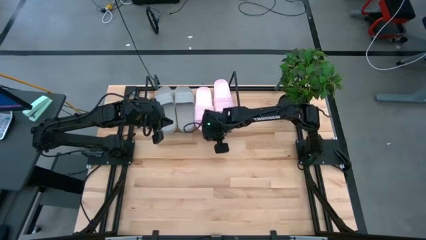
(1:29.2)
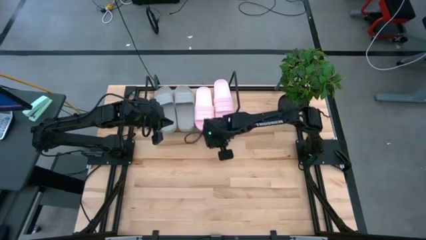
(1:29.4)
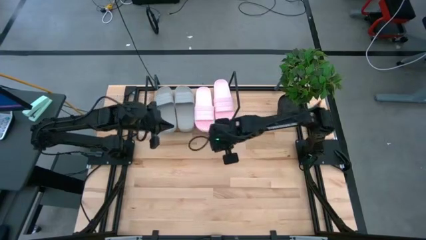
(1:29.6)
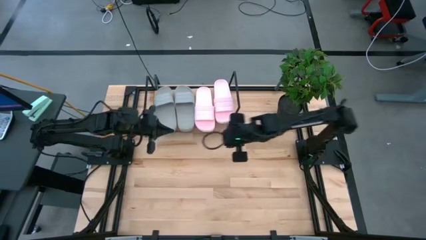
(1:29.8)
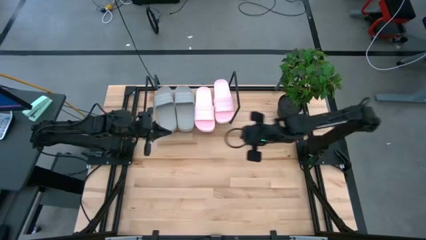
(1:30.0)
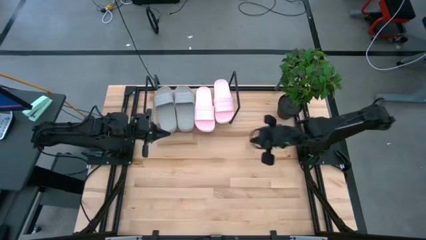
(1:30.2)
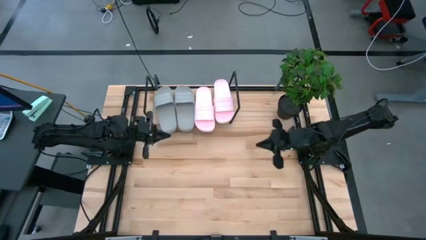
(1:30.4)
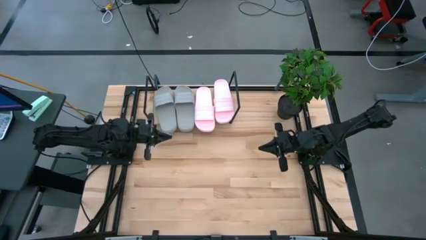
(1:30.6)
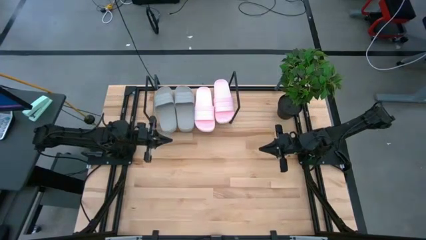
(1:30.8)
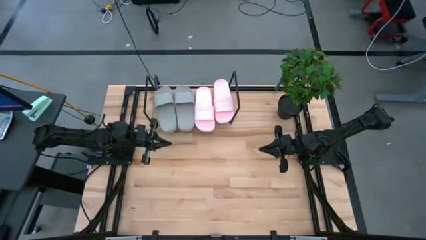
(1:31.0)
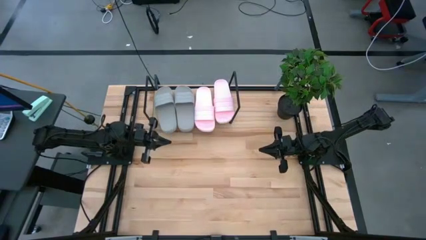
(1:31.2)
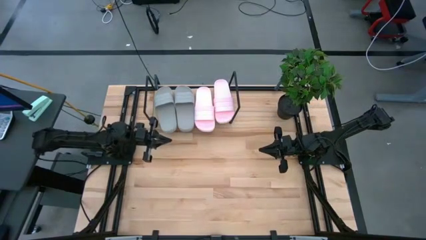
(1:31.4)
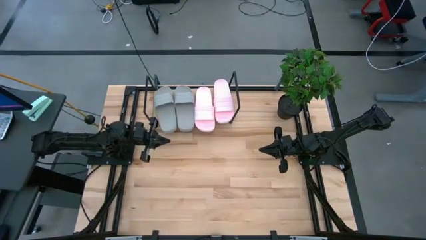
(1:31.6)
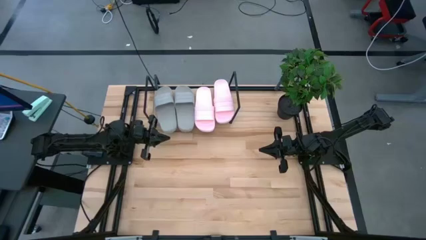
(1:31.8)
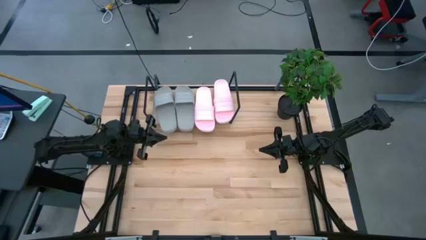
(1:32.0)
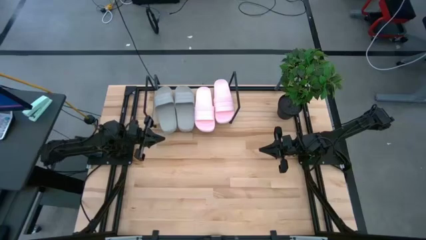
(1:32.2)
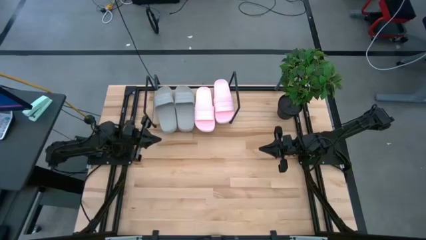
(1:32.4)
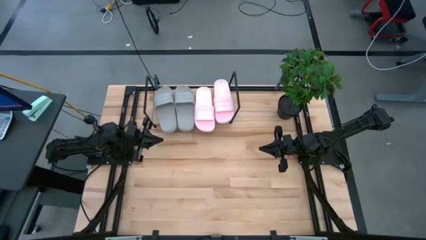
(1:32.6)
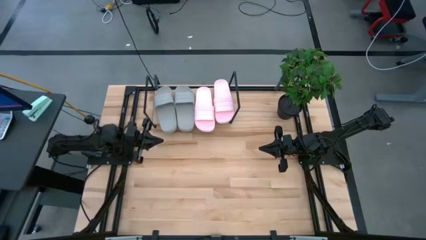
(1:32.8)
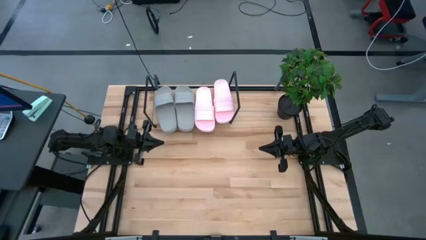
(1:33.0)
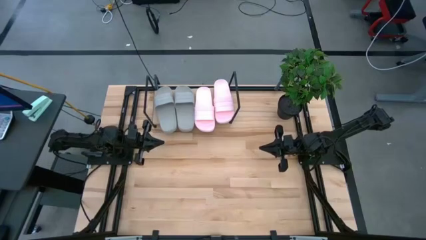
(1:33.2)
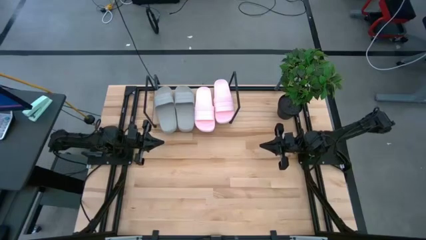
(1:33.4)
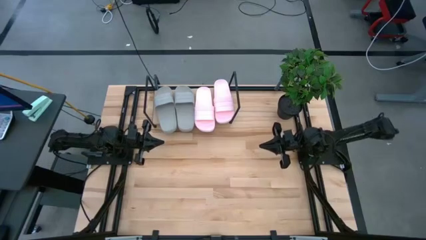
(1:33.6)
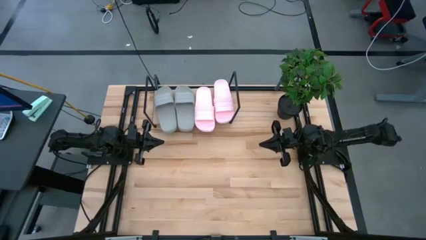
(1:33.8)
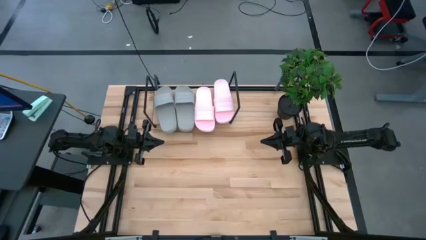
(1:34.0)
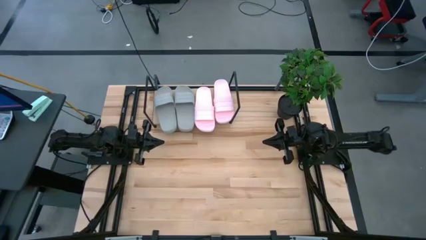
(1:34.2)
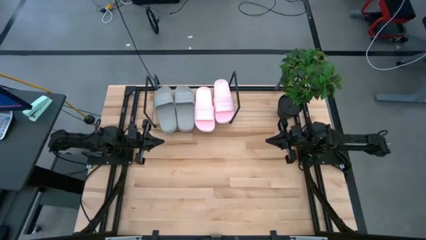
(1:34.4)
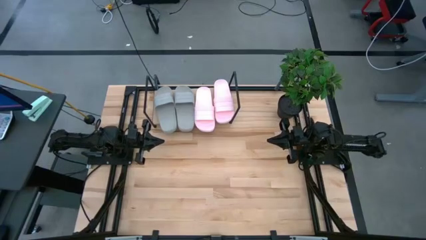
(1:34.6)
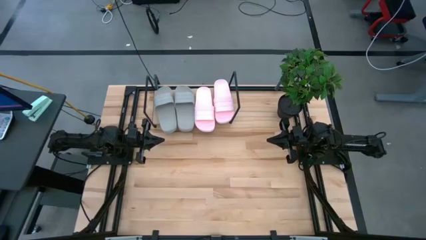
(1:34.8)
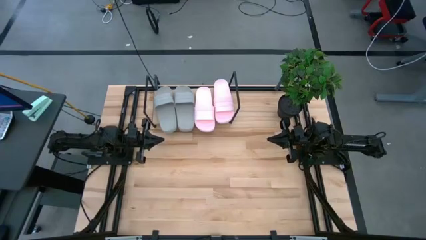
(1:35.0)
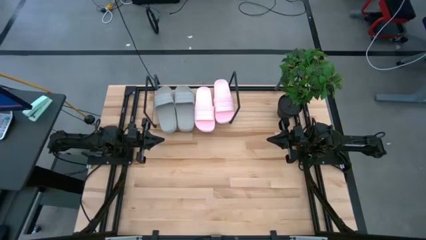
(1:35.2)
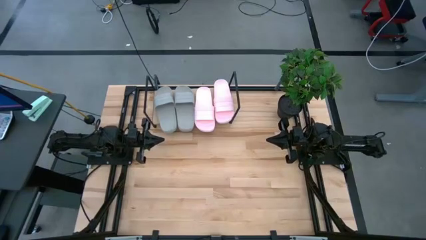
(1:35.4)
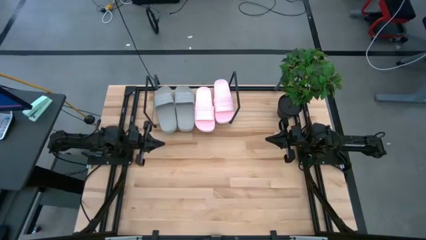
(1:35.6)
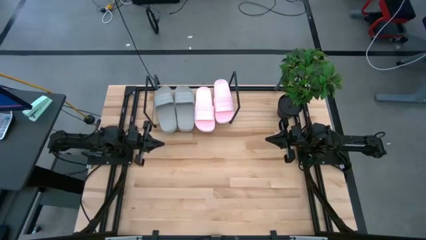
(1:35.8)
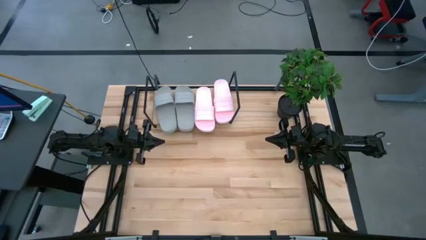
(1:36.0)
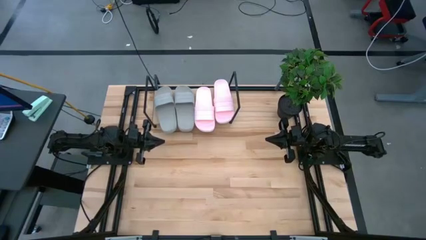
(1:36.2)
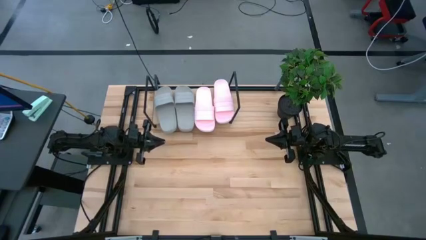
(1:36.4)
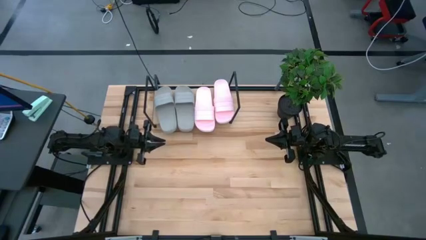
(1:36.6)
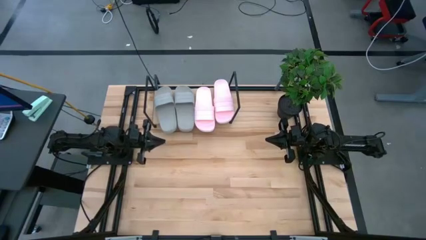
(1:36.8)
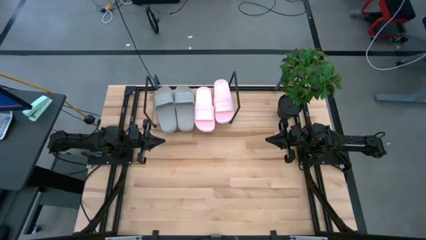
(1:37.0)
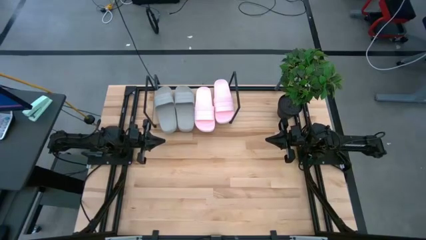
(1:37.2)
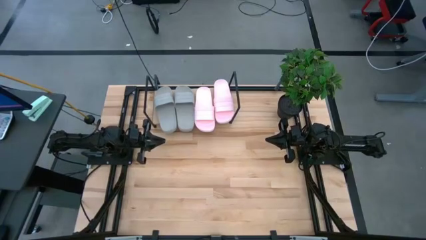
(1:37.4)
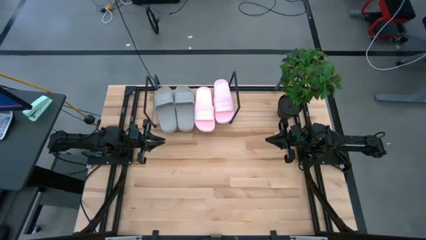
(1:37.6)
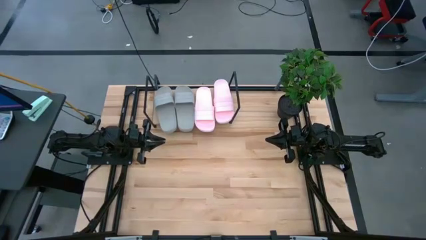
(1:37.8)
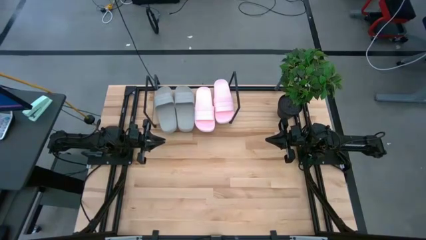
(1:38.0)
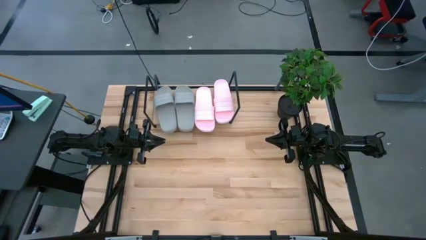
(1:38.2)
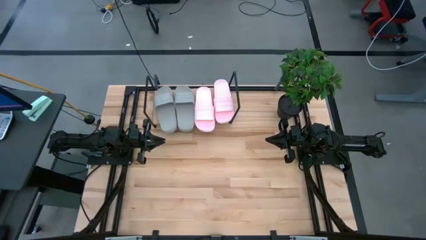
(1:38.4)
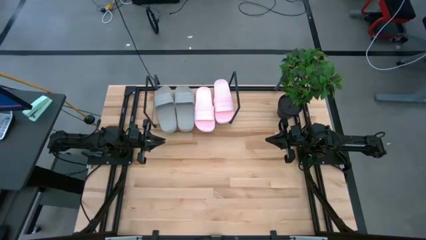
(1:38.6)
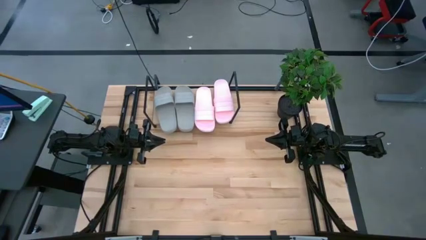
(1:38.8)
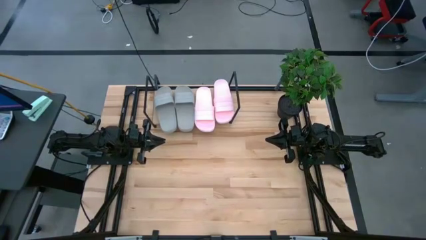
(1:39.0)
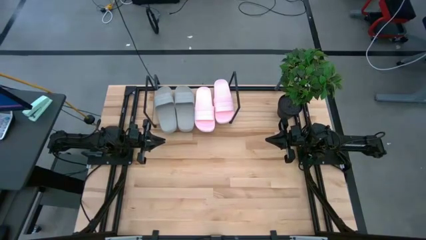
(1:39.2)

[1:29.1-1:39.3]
Task: Pick and place slides into the shelf
Return to Home Position

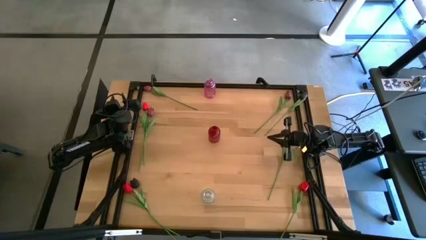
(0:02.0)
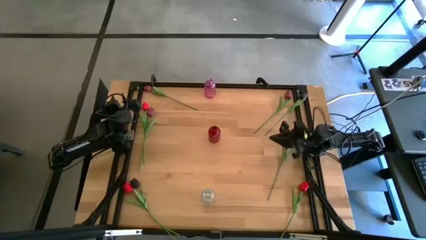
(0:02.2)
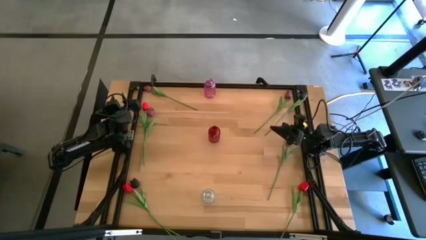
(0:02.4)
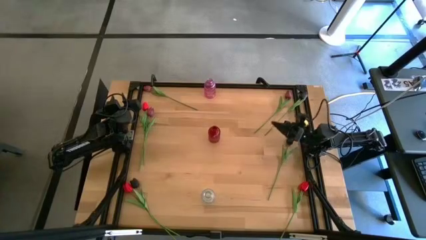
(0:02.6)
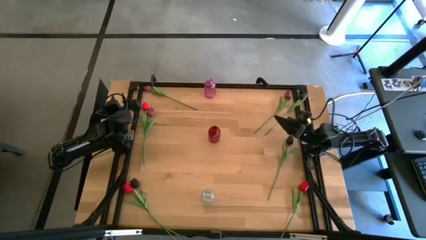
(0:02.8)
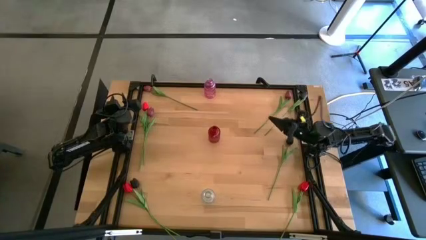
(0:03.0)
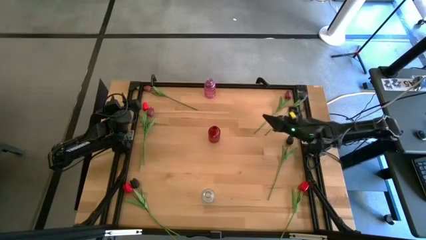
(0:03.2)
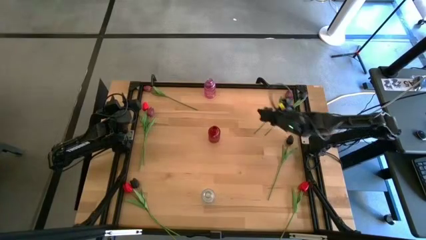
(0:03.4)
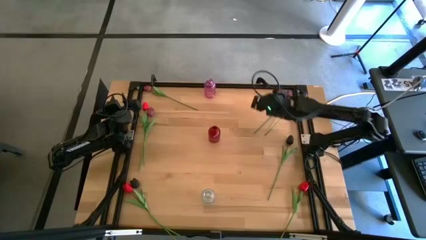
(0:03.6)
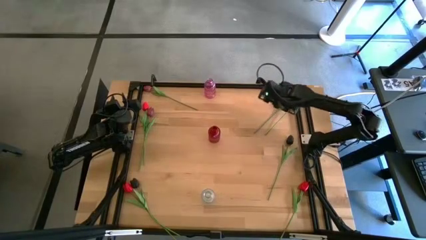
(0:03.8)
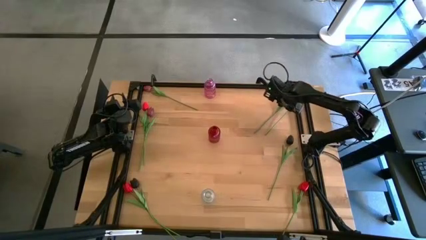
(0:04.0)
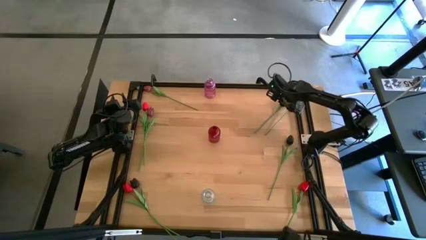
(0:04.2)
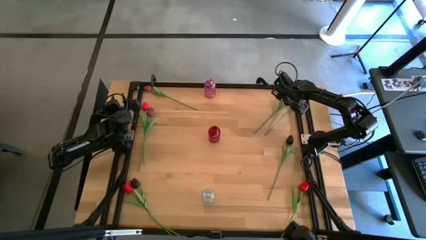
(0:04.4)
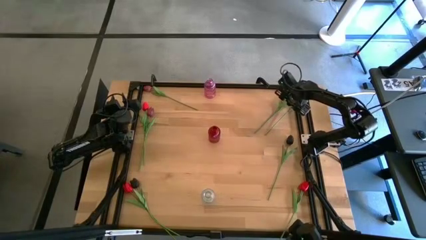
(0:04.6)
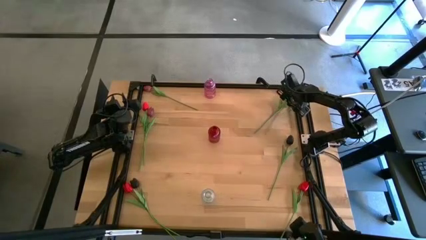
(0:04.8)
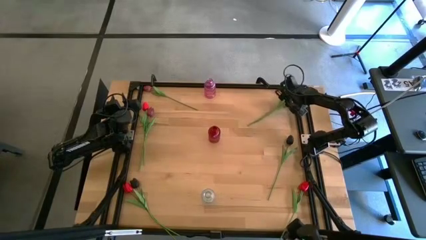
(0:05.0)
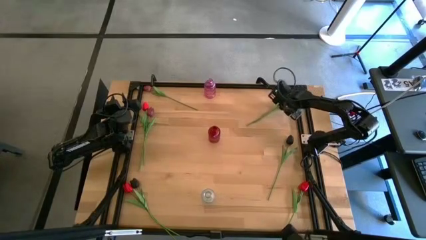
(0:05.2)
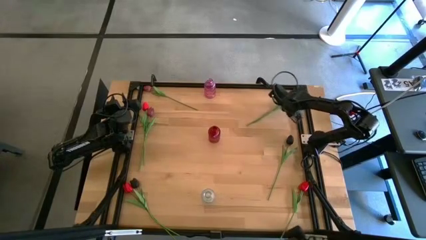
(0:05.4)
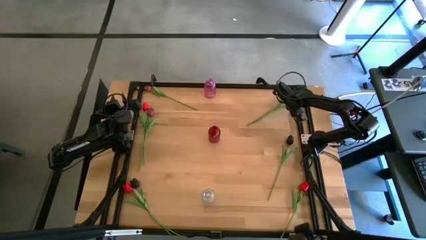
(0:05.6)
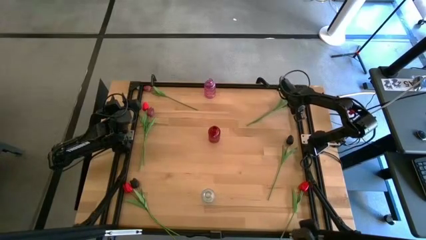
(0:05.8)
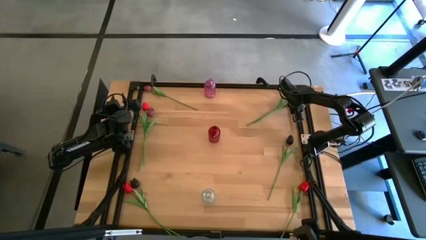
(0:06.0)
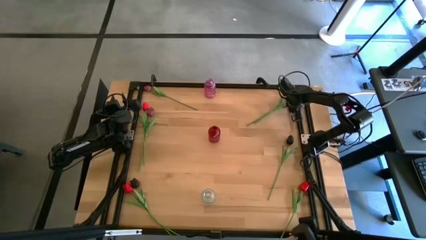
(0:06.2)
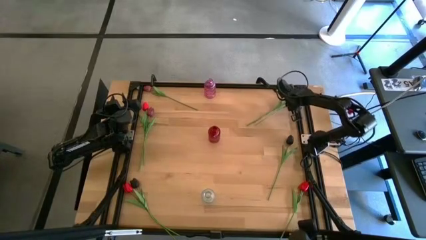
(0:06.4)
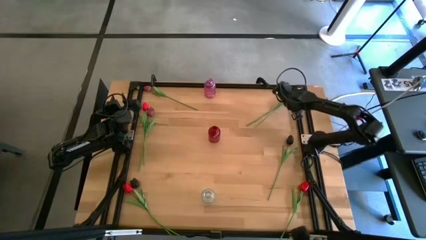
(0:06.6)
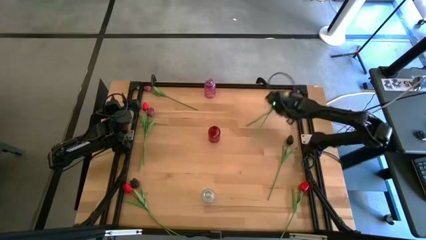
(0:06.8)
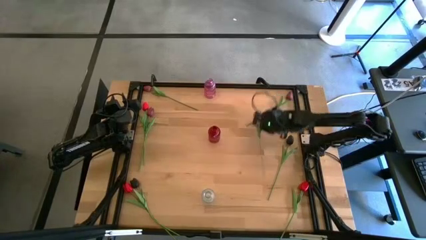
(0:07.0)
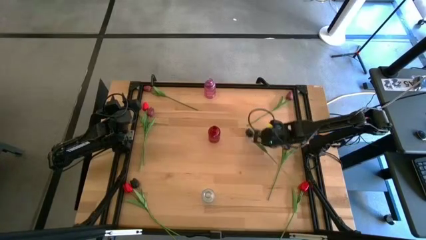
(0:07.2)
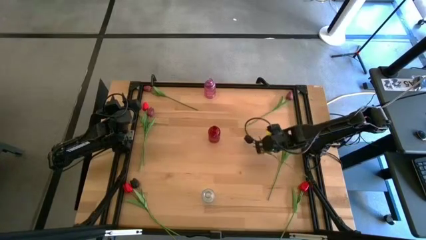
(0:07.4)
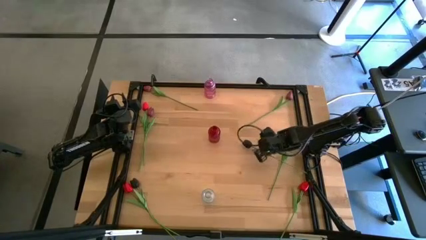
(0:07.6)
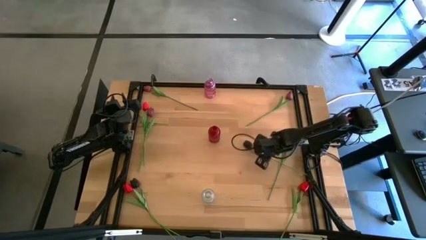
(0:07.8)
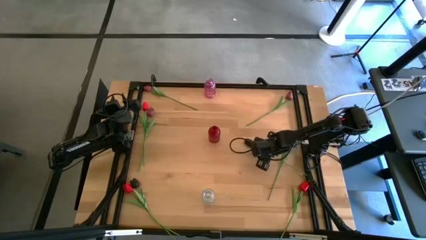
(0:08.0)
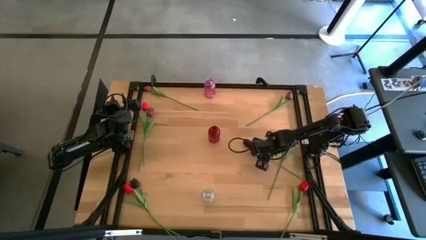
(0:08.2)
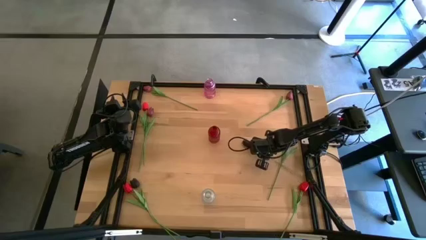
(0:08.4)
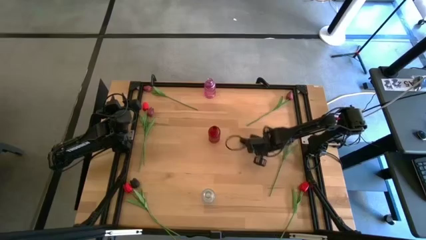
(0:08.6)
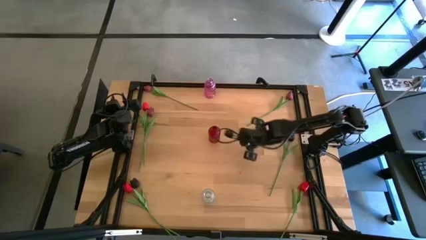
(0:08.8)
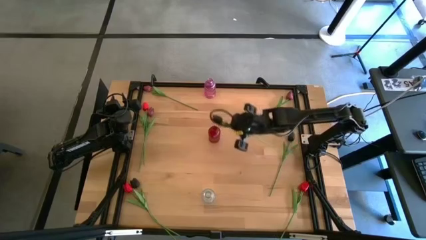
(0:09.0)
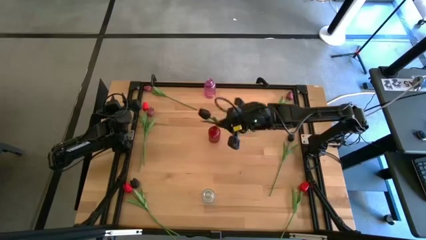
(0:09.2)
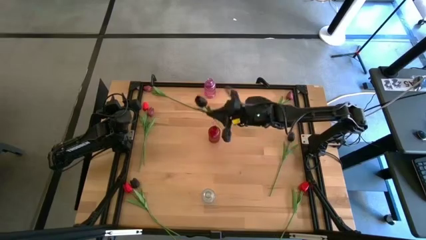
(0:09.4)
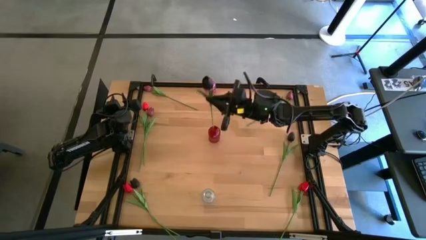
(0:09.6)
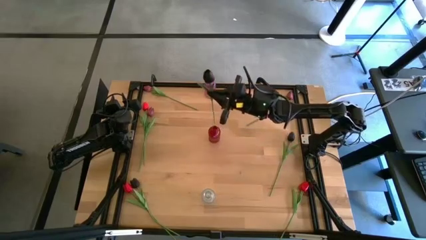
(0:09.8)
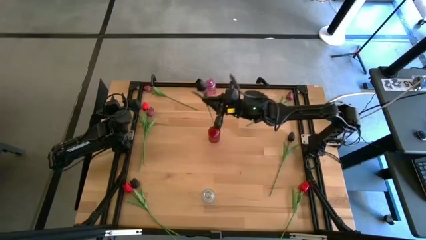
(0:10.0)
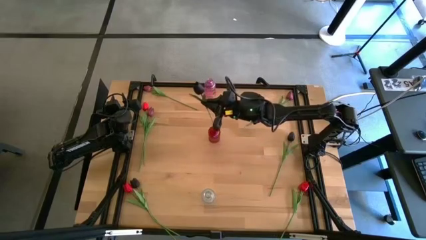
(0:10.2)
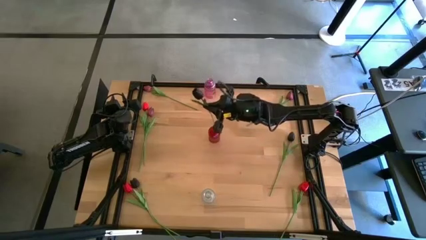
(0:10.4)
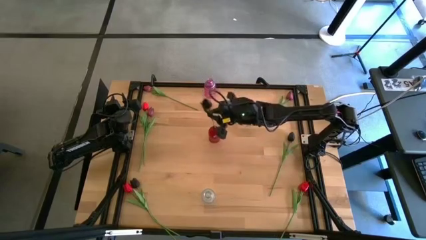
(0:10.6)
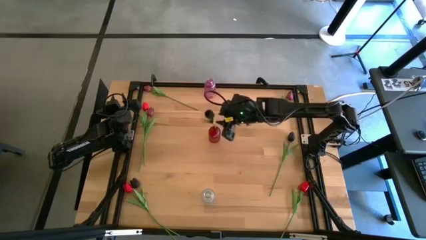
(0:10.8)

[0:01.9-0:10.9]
Task: Sort flowers into vase by color
Put the top black tulip into the red vase
